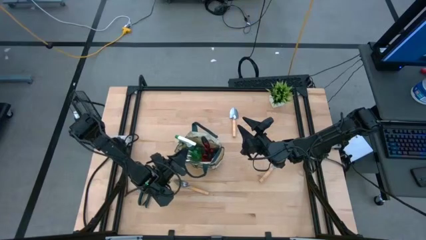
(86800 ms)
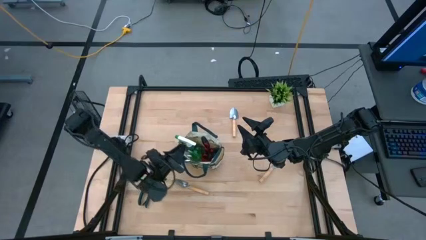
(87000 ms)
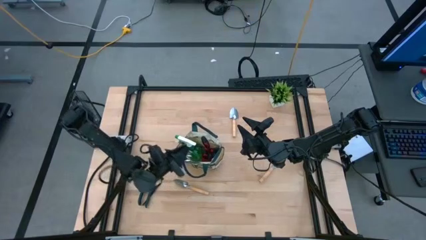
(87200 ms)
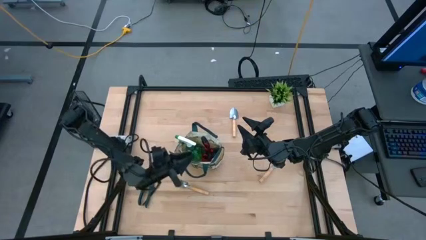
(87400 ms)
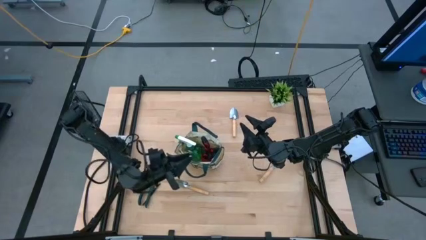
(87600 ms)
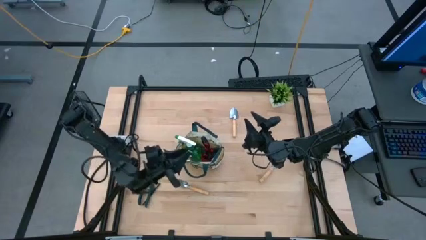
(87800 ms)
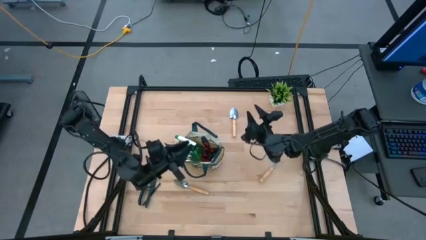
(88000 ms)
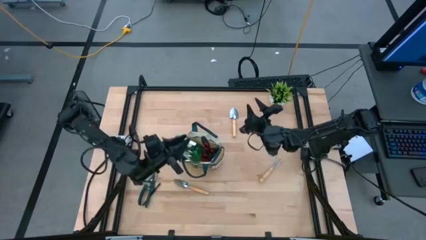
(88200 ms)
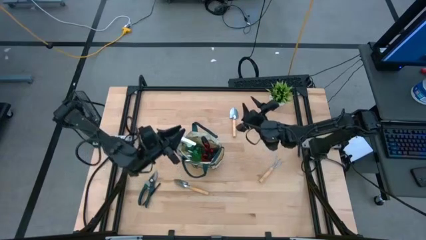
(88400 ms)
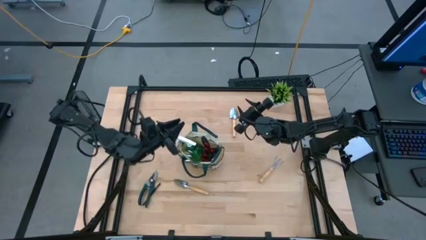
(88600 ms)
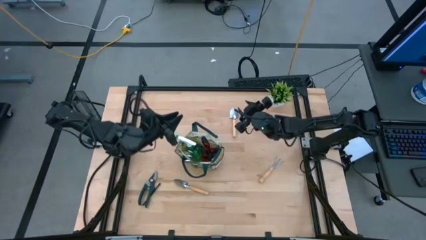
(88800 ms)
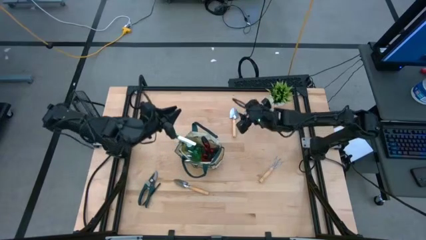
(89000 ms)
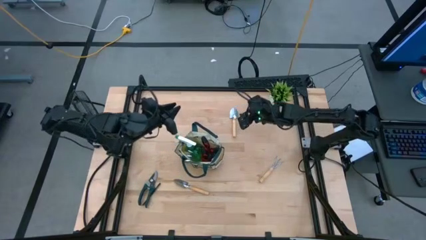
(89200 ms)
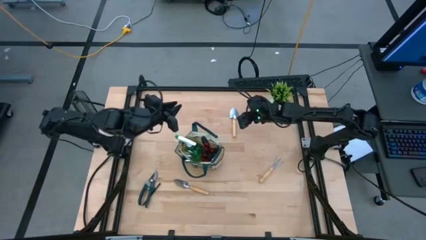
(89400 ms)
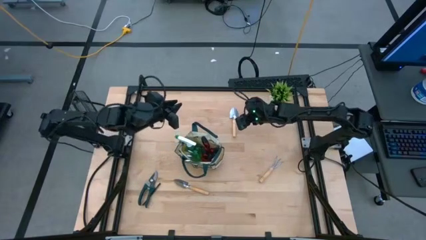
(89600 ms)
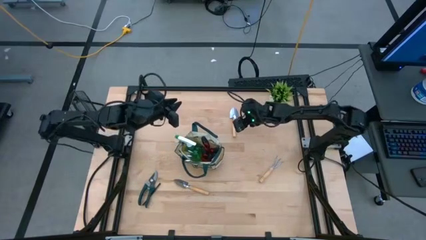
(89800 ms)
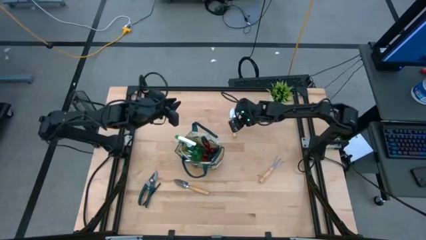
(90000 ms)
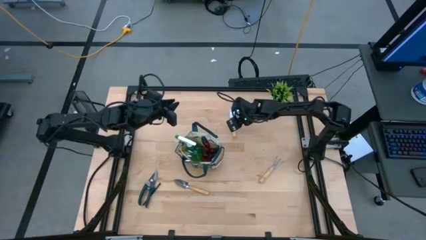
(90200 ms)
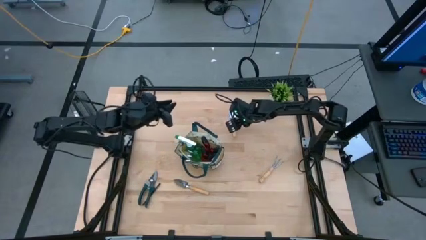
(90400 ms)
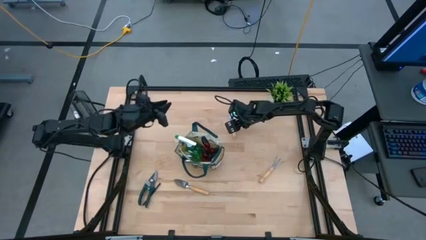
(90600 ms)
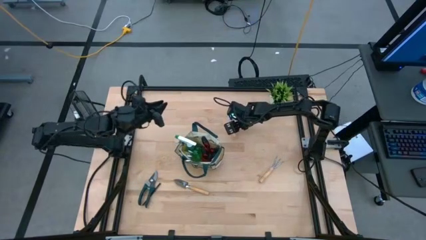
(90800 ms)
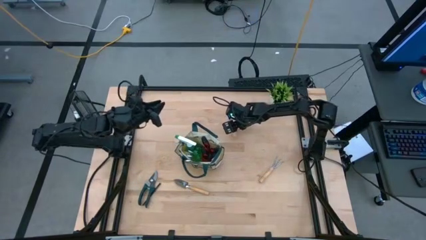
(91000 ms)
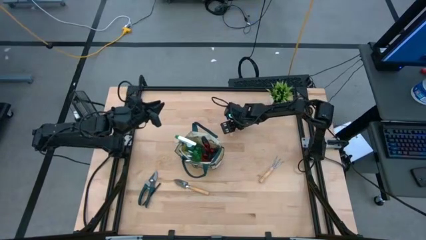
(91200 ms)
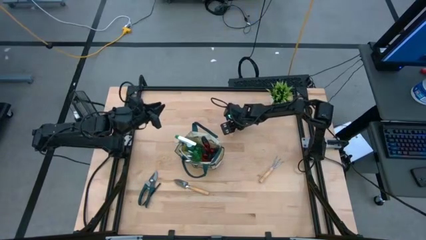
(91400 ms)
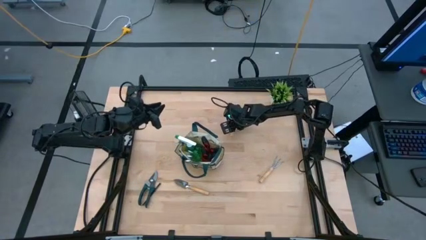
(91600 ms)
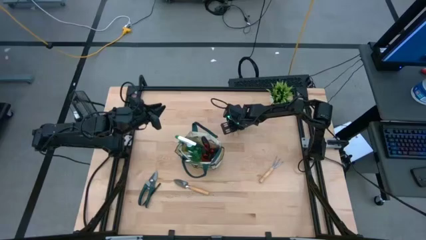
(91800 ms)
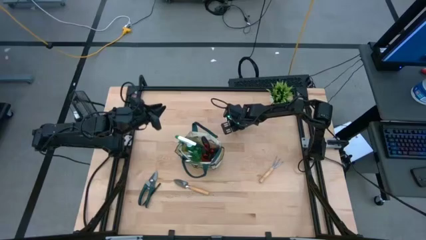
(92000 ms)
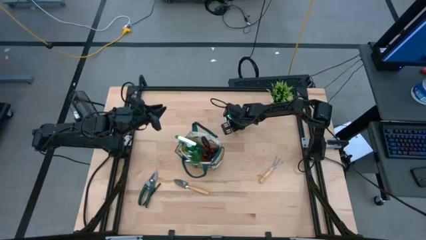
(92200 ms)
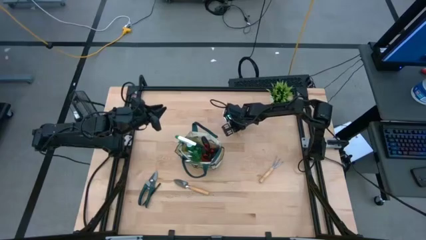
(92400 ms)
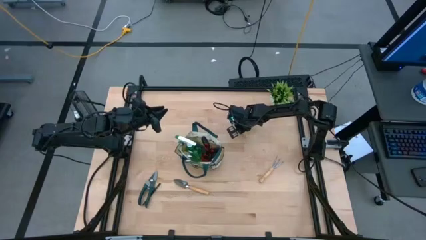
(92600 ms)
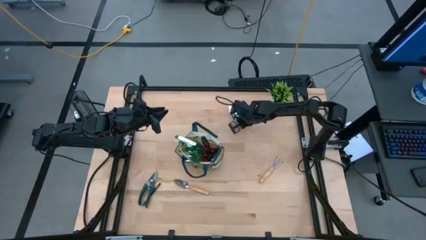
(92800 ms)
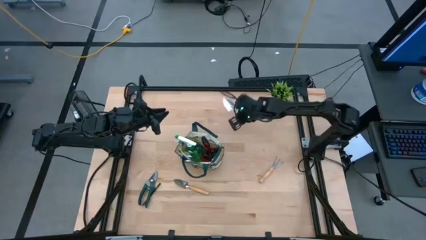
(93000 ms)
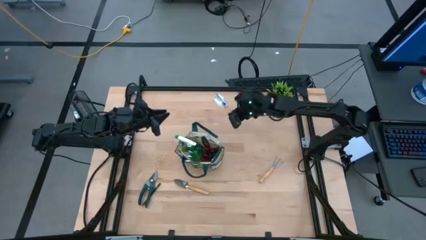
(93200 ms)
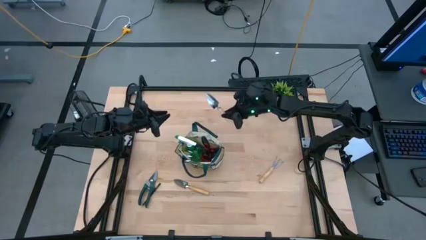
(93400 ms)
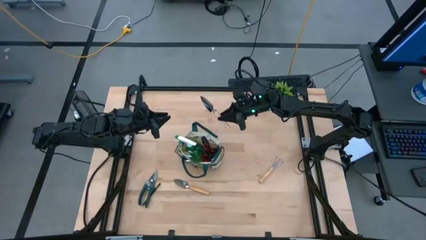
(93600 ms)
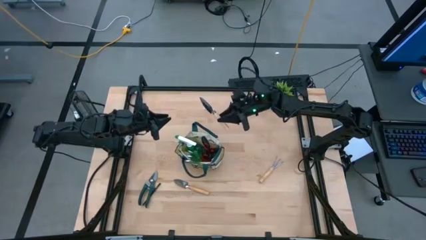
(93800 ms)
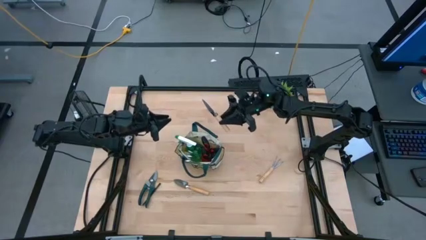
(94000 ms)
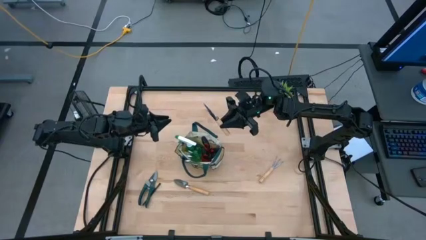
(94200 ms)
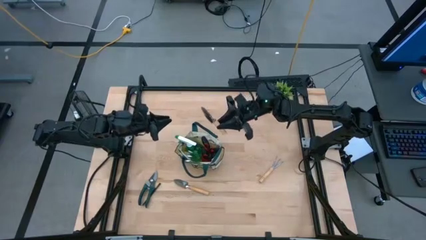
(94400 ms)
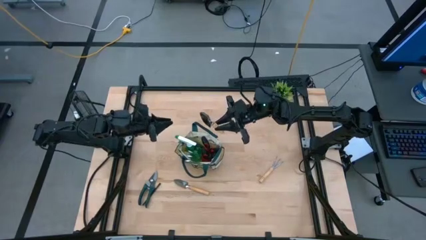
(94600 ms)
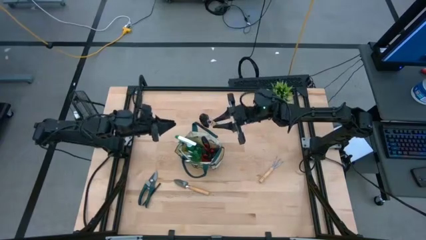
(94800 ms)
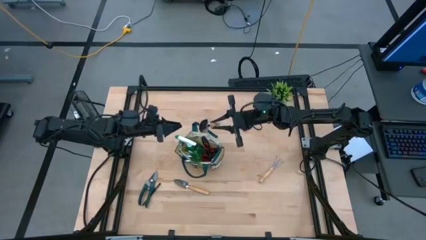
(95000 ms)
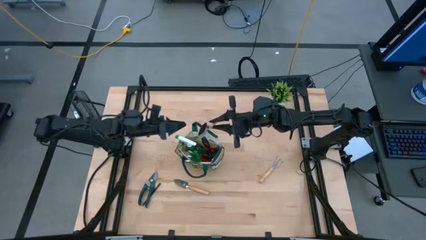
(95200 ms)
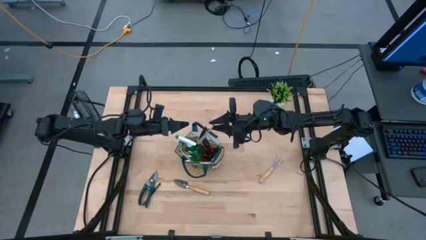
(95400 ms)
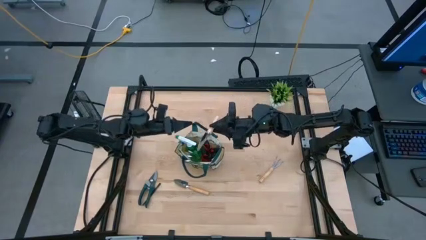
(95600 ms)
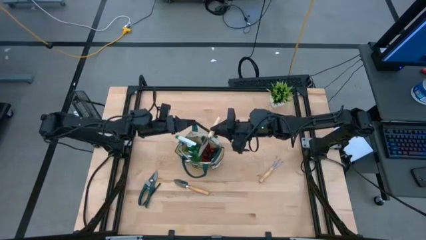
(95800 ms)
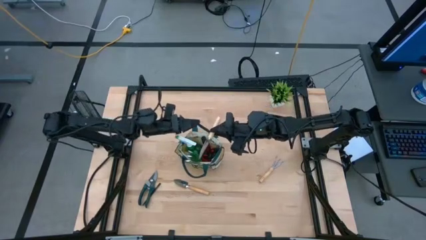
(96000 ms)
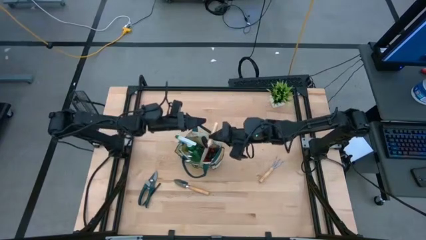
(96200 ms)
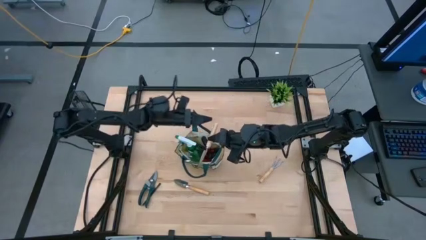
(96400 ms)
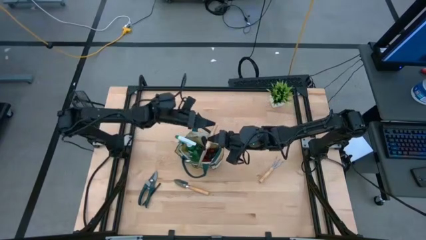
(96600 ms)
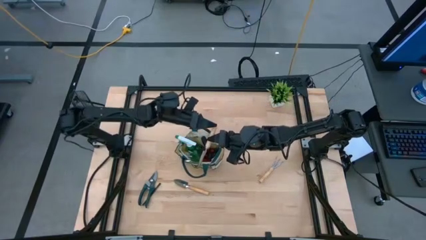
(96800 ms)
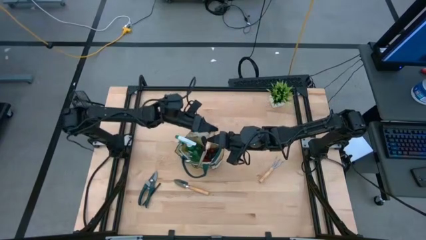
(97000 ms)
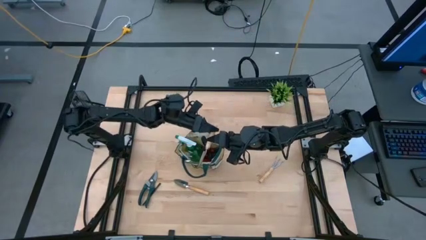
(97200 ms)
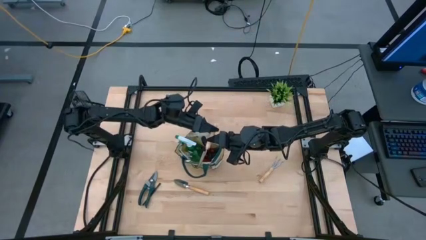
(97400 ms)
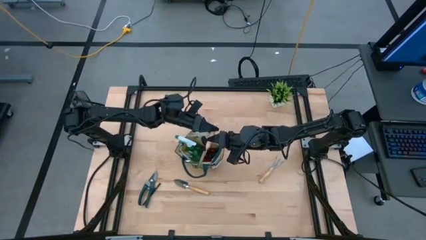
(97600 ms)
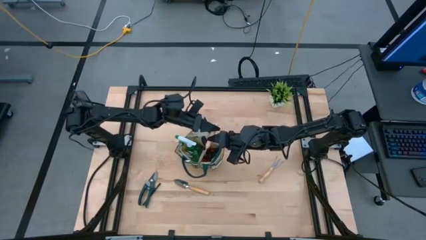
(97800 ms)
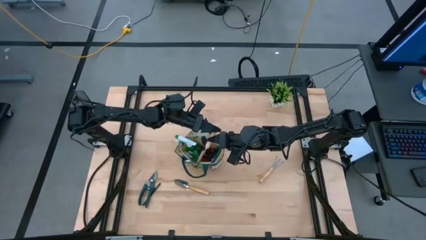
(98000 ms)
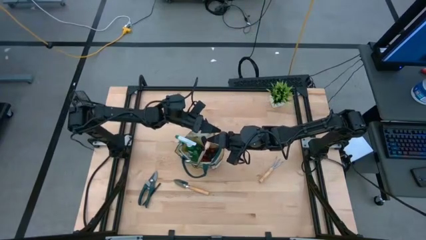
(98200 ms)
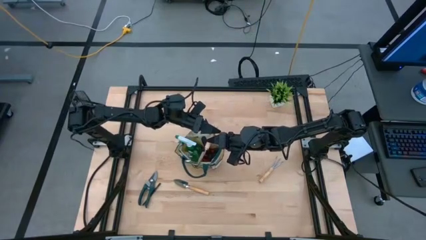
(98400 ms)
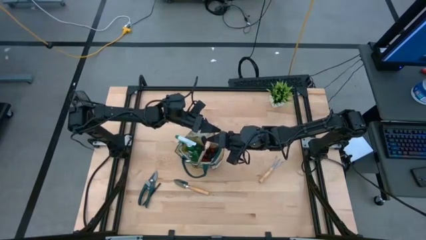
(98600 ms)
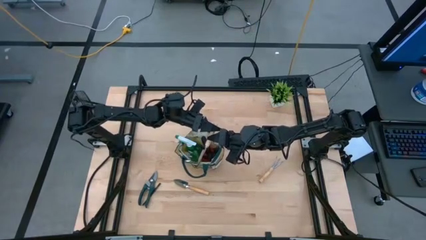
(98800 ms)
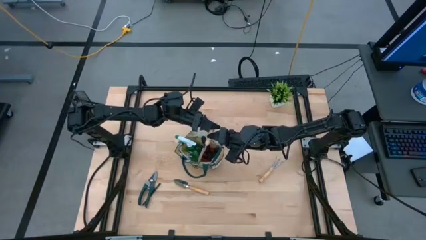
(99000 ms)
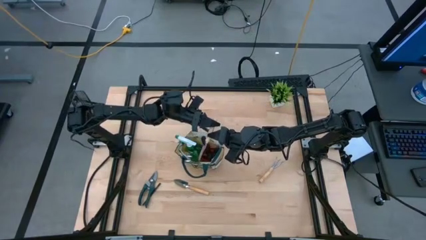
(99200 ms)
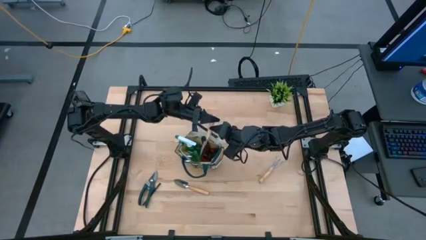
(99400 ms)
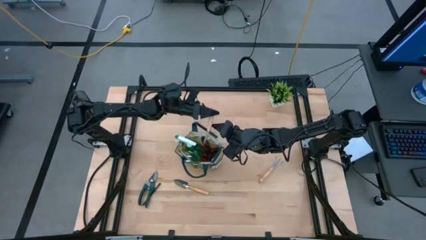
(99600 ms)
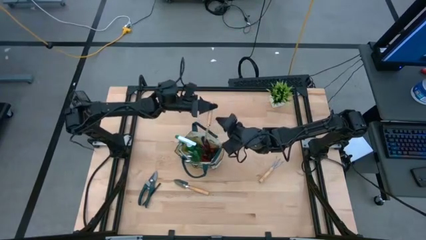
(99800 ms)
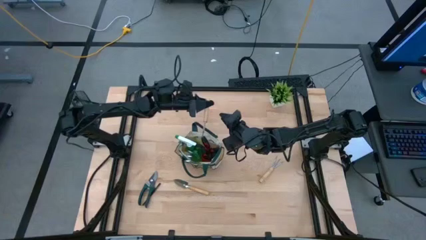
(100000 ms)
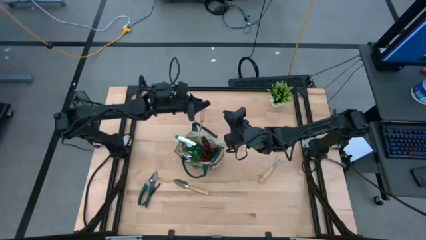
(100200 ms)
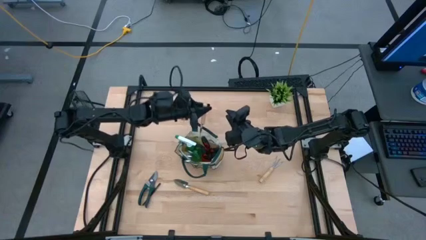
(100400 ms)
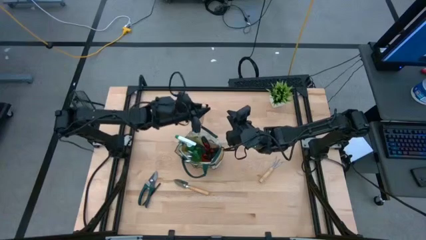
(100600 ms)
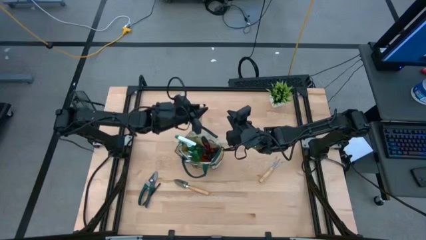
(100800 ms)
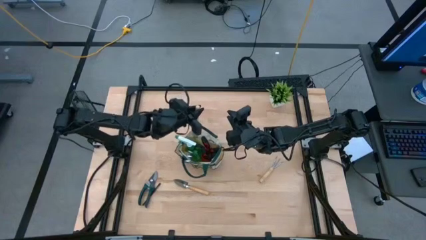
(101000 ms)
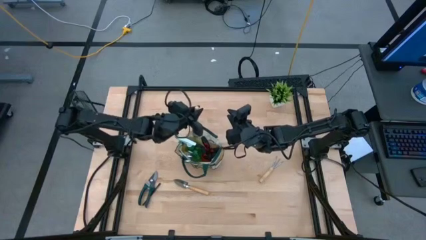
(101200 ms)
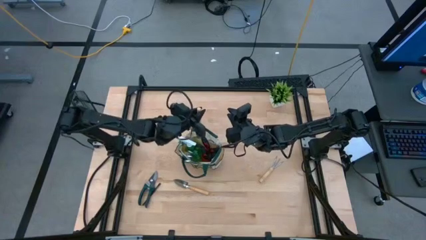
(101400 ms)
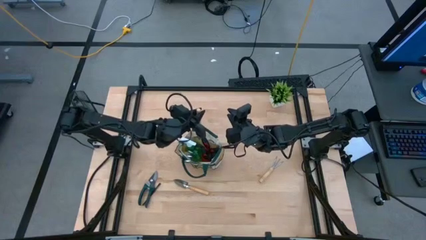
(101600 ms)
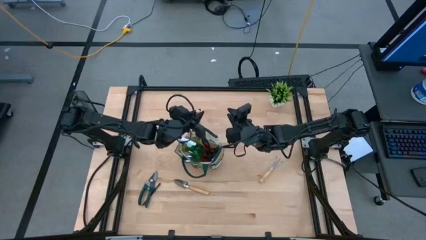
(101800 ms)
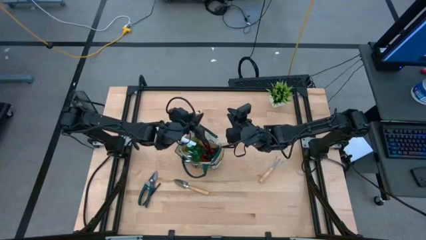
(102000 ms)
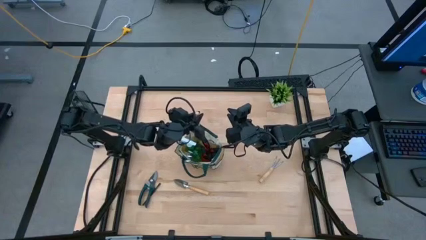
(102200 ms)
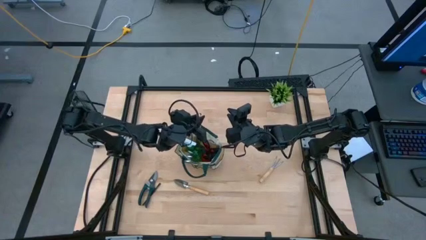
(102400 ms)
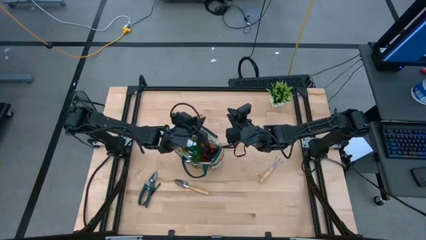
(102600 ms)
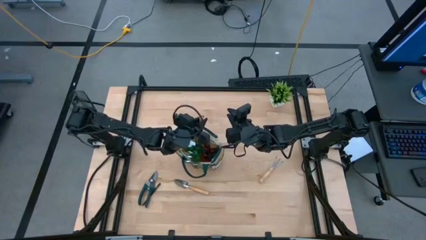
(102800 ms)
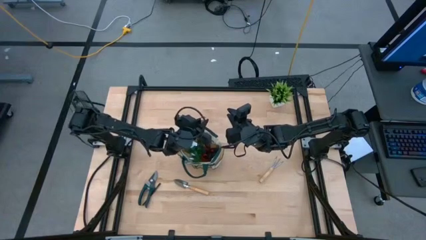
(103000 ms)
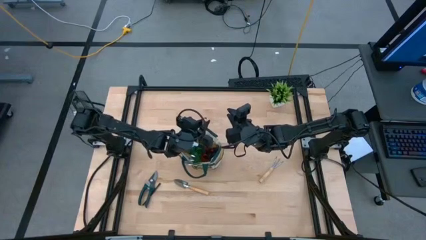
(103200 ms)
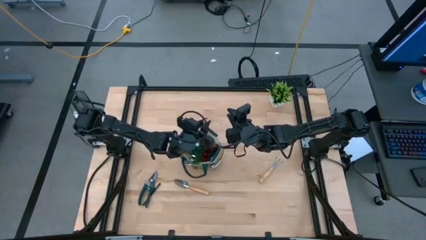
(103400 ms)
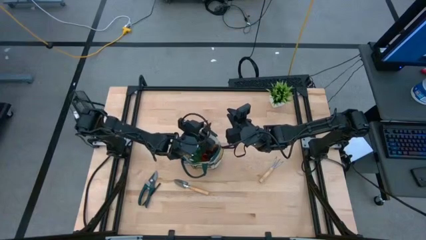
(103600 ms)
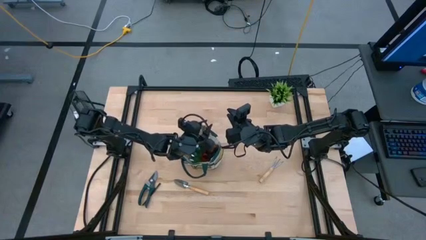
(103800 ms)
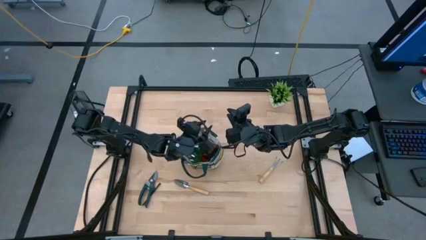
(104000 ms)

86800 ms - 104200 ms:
Task: Pick & Place Garden tools in Gardening bag
Put the brown trowel into the gardening bag
